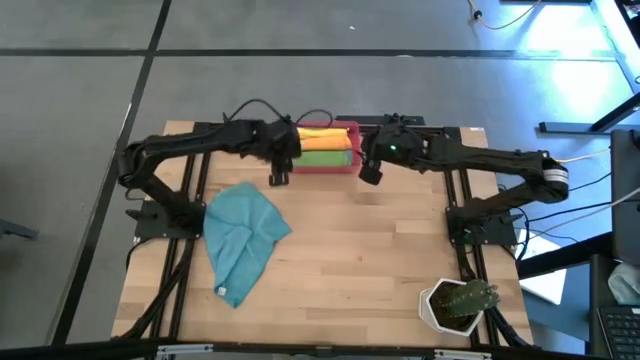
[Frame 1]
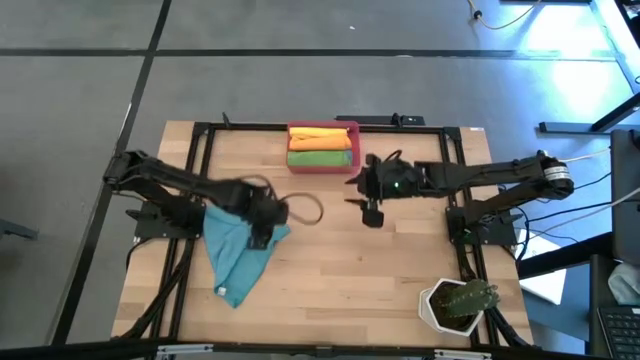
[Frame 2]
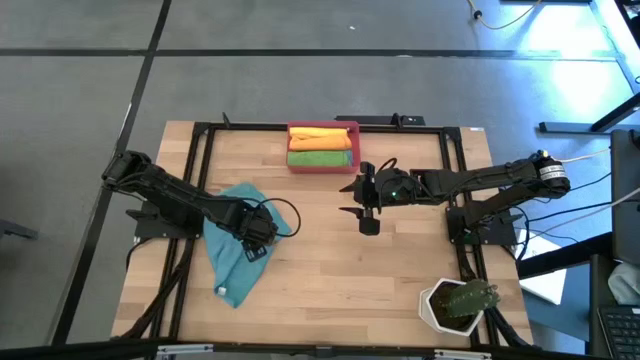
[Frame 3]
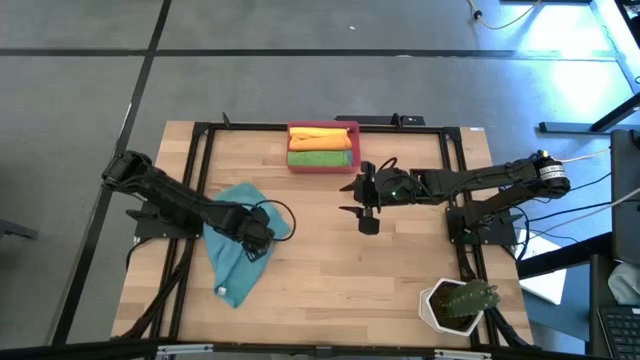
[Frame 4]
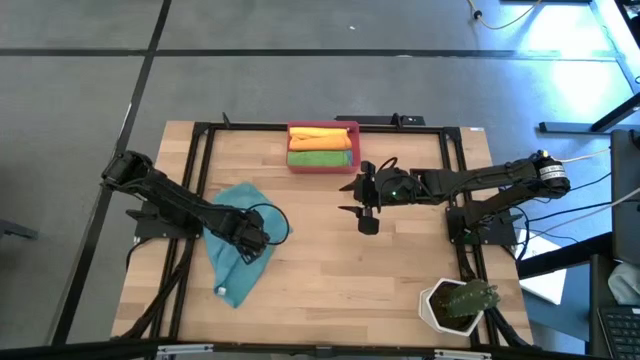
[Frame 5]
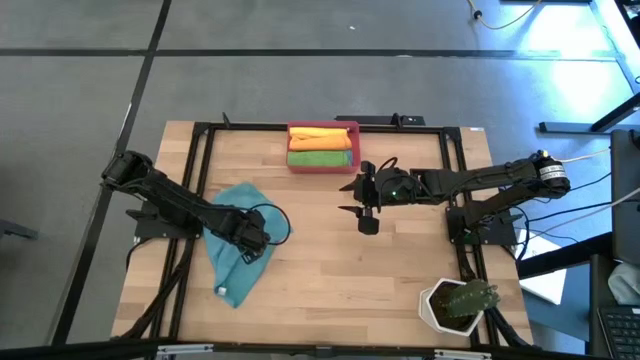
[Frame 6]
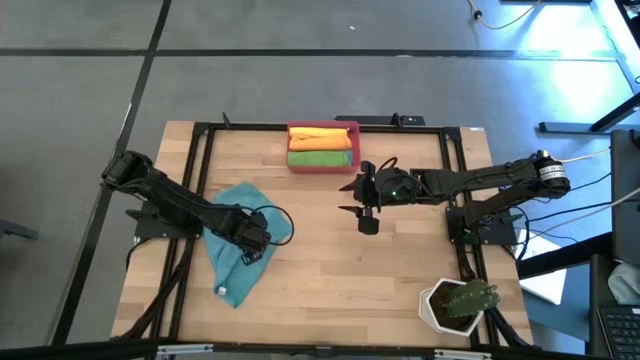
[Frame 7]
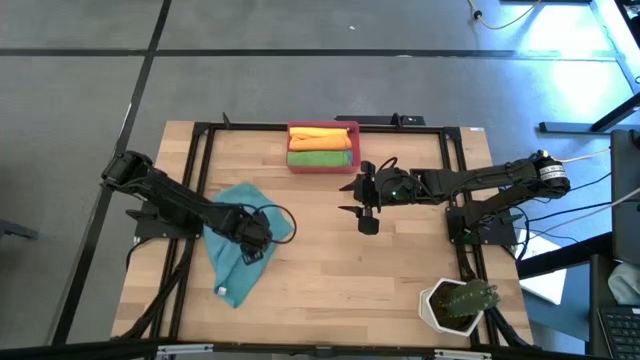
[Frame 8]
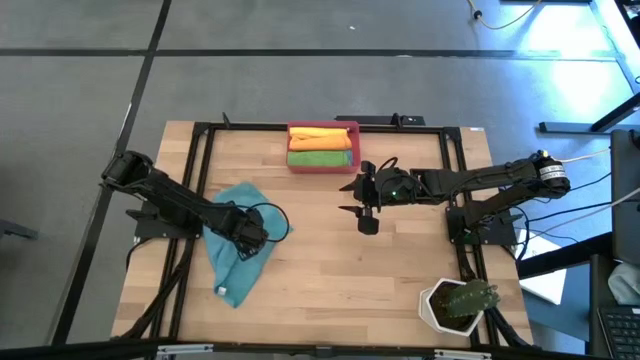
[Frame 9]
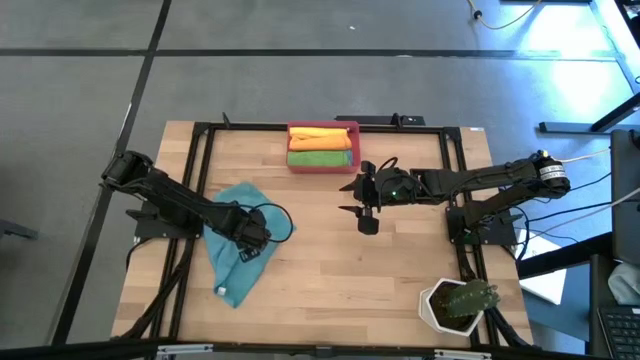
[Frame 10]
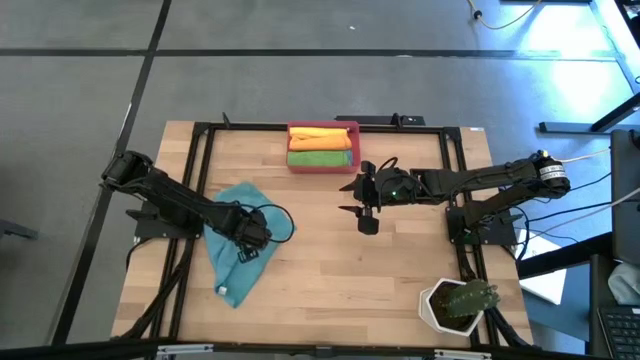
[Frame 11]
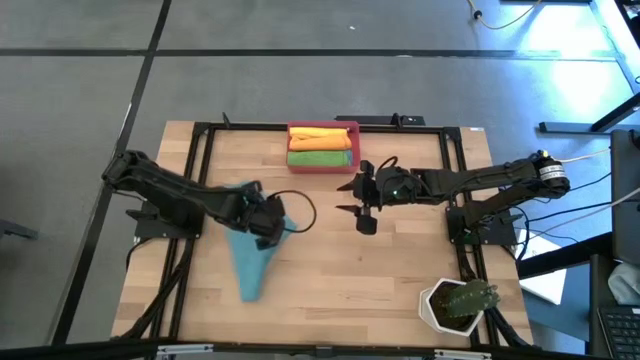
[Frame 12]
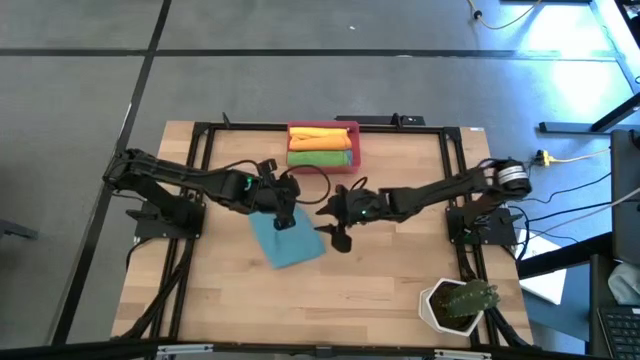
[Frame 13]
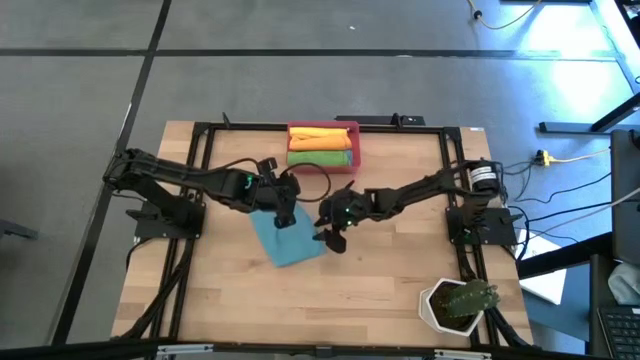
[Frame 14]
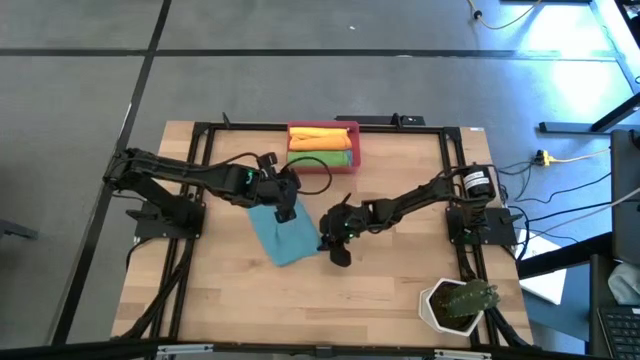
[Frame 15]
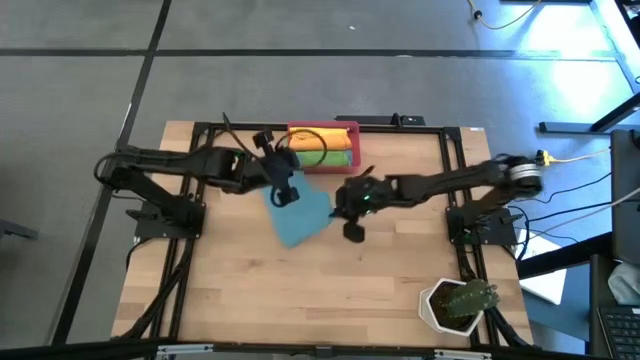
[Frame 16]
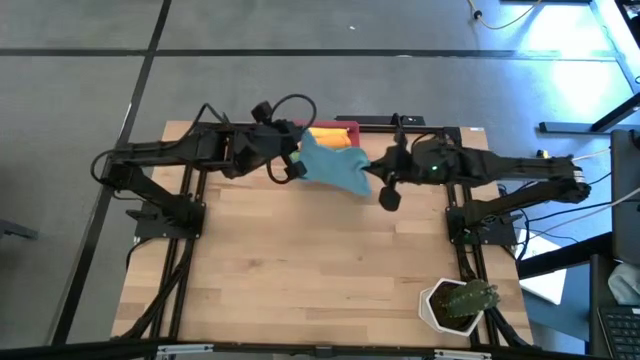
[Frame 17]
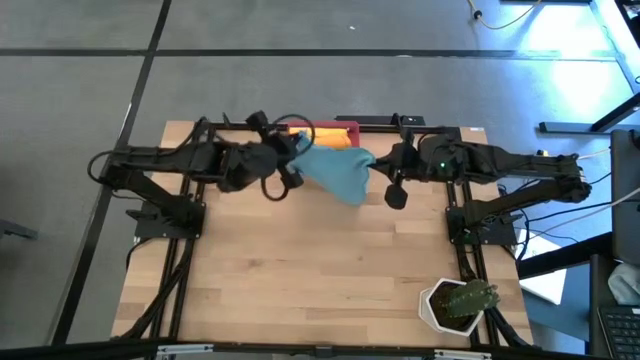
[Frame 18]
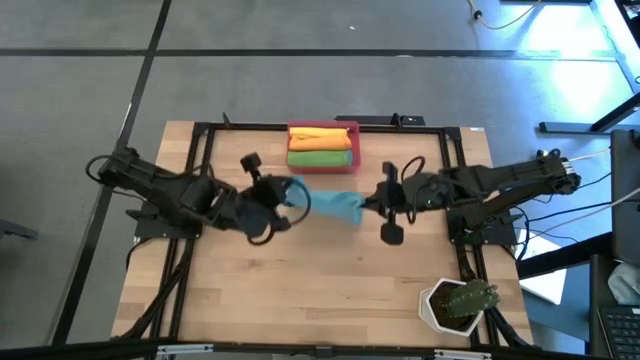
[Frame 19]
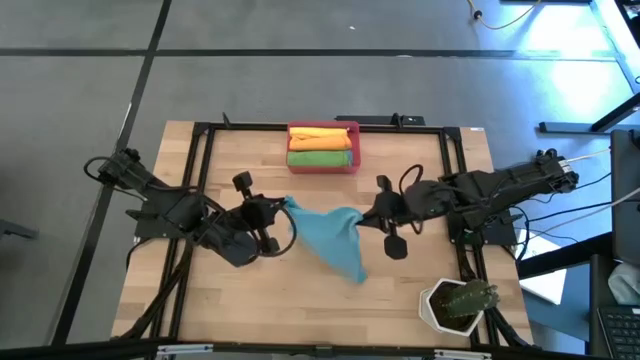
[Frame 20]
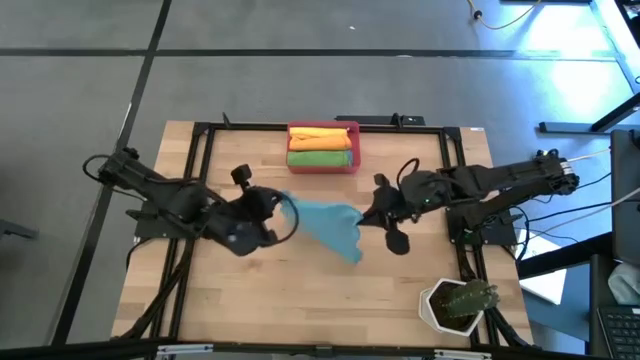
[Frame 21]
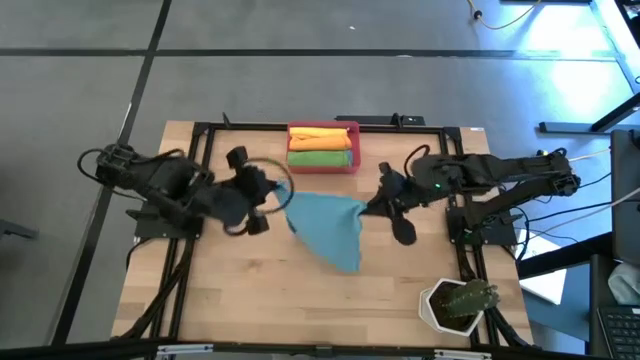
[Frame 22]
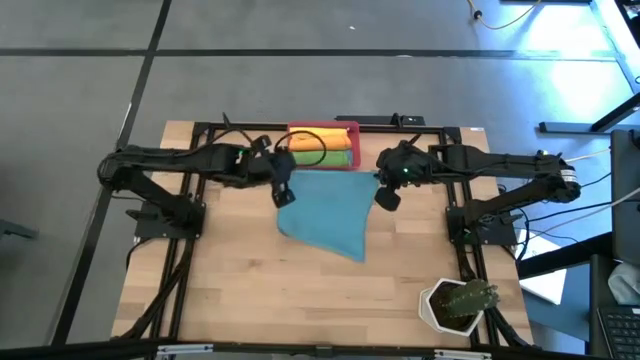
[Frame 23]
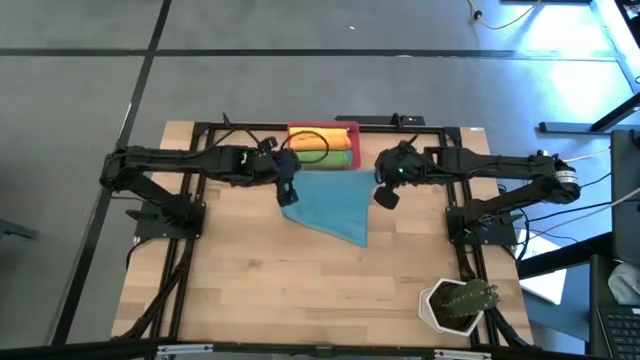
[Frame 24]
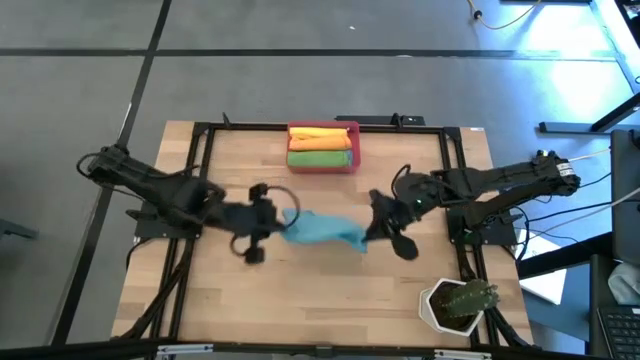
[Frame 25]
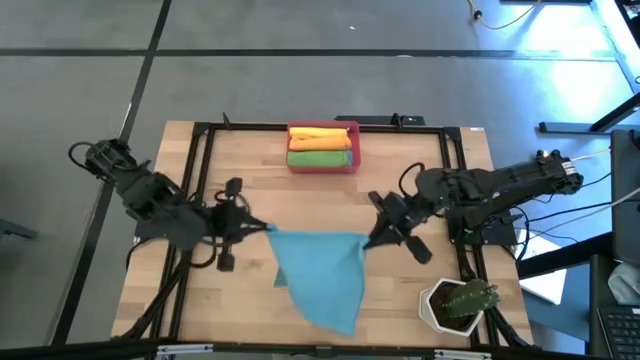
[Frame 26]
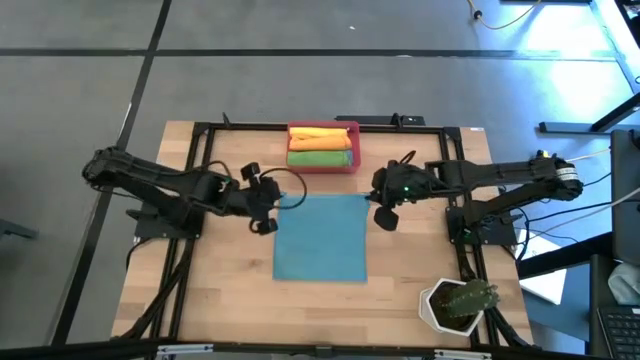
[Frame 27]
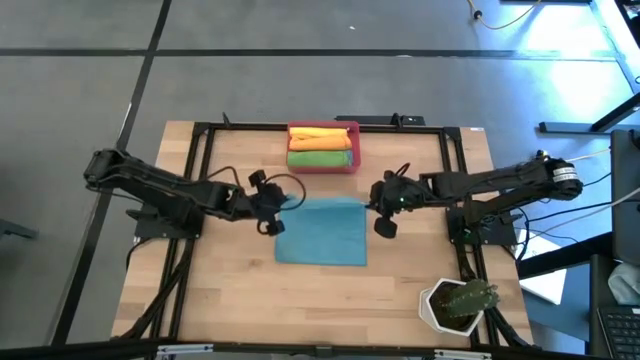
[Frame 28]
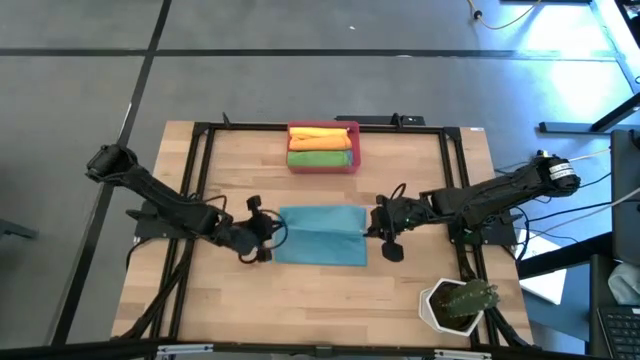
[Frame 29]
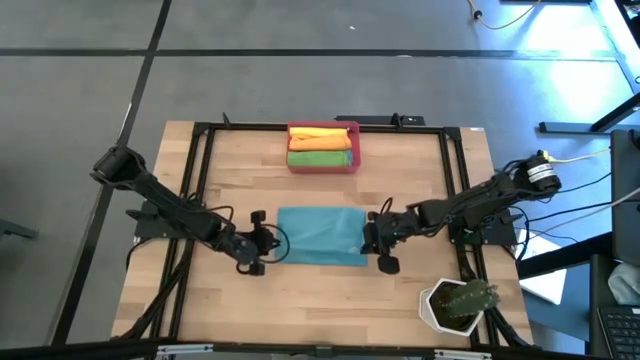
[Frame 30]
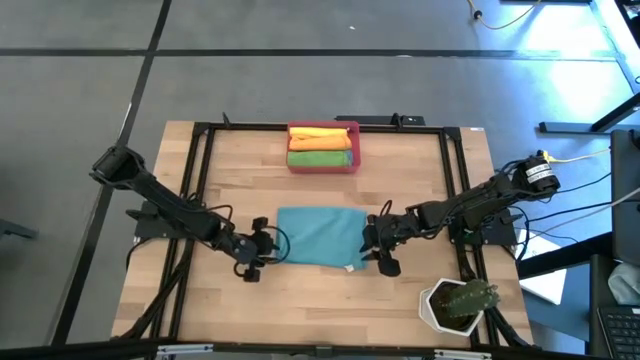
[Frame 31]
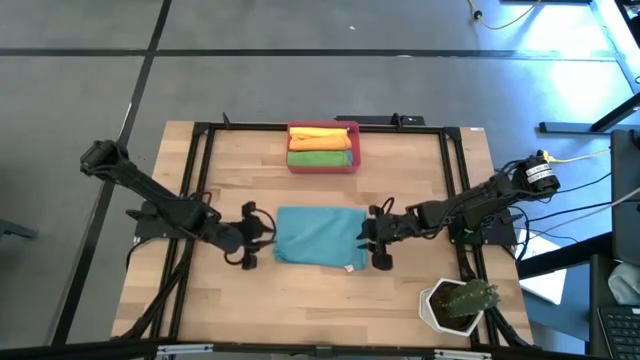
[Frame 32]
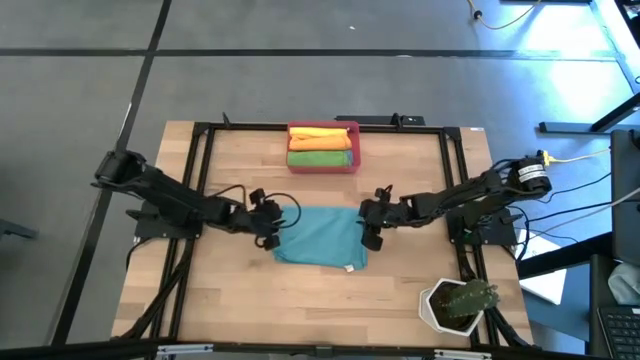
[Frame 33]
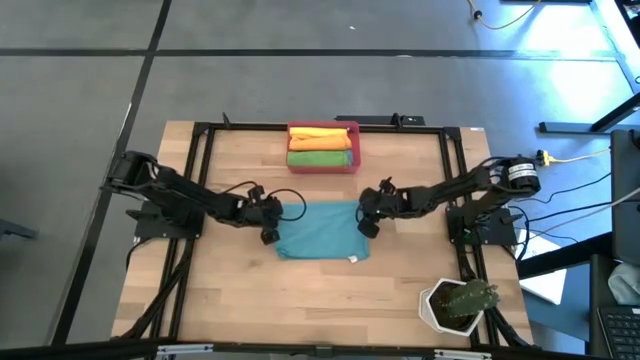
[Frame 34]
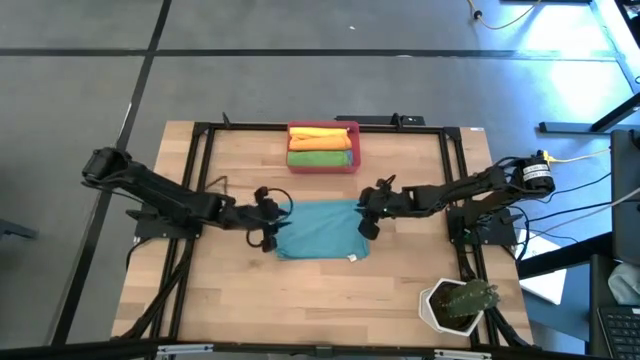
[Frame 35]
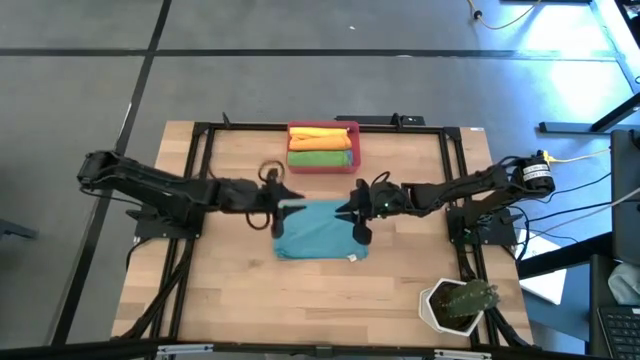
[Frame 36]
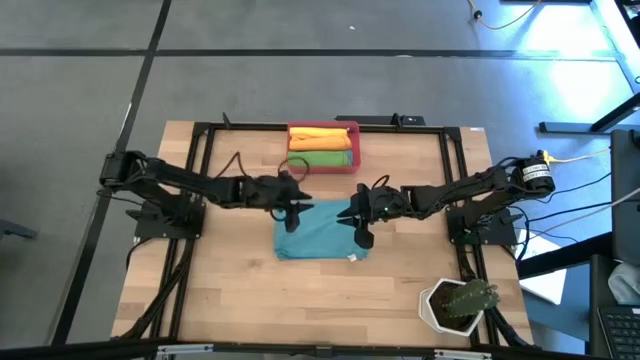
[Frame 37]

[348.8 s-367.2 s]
Task: Roll microfiber towels into tight, uniform cylinder then place into a basket
Fold the blue microfiber towel

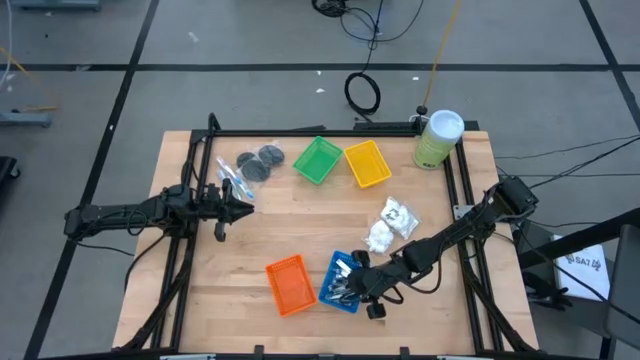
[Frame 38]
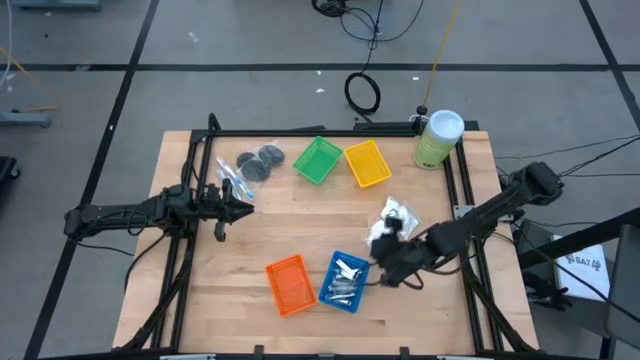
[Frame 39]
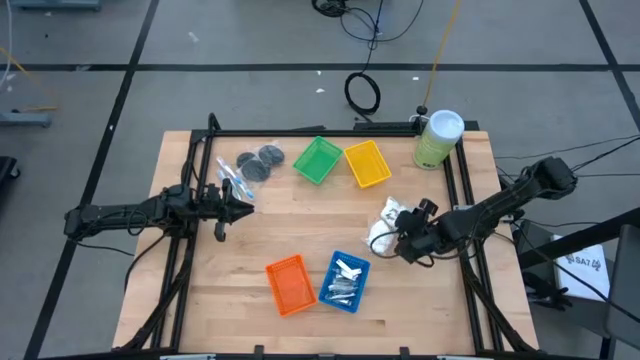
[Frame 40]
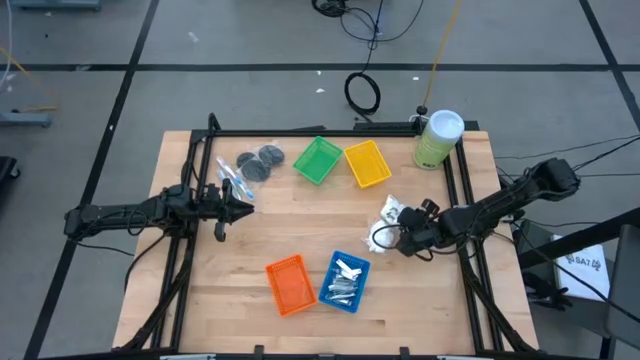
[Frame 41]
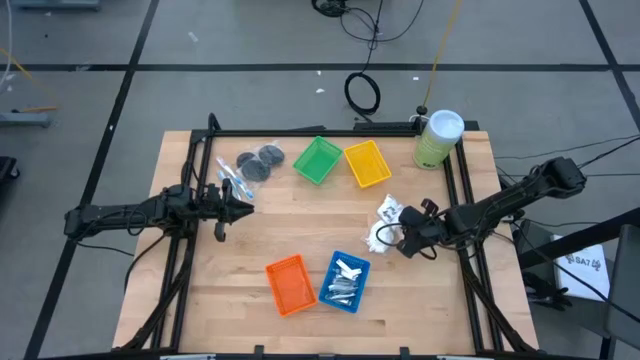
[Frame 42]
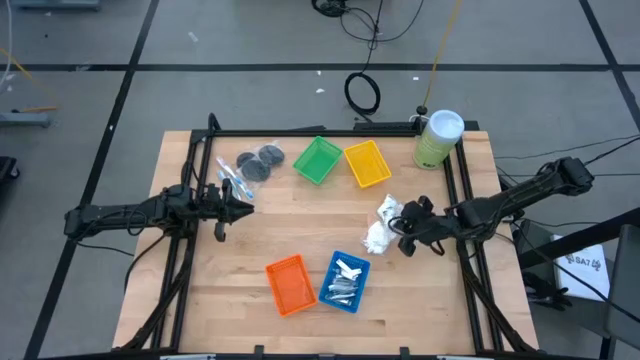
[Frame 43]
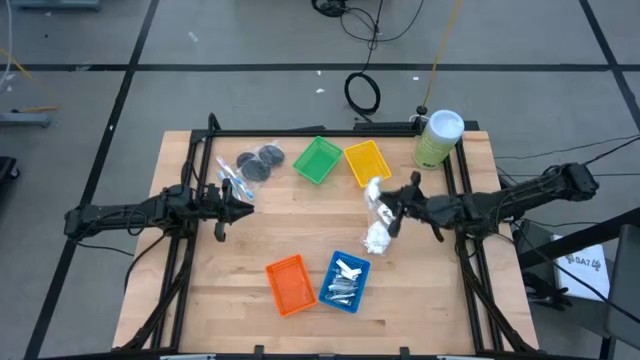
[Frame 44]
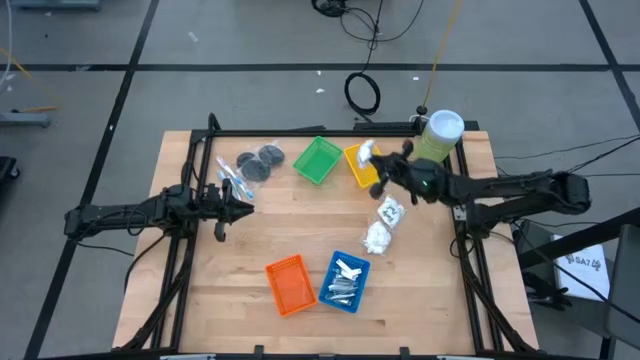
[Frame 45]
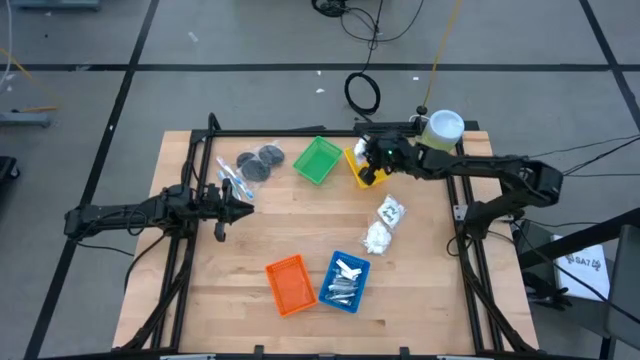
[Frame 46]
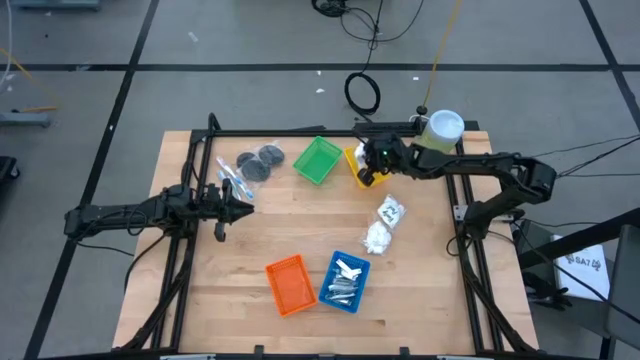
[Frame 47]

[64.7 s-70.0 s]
Task: Pick & Place Travel size toiletries
Put the white cotton pack into the yellow bin
